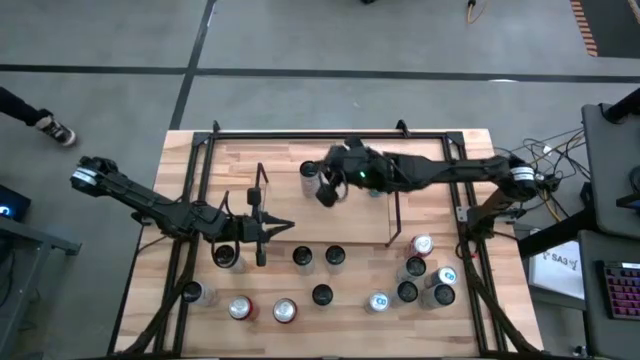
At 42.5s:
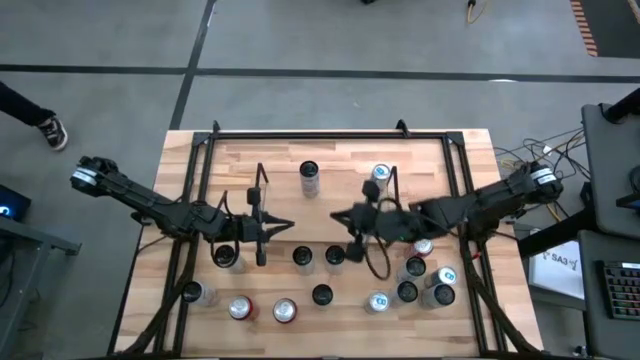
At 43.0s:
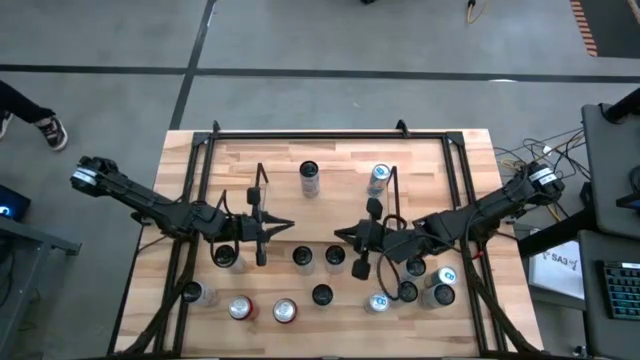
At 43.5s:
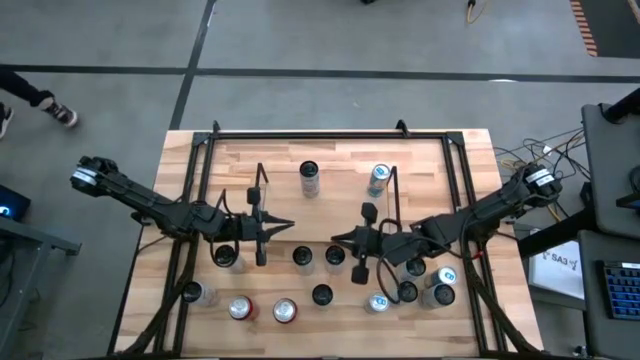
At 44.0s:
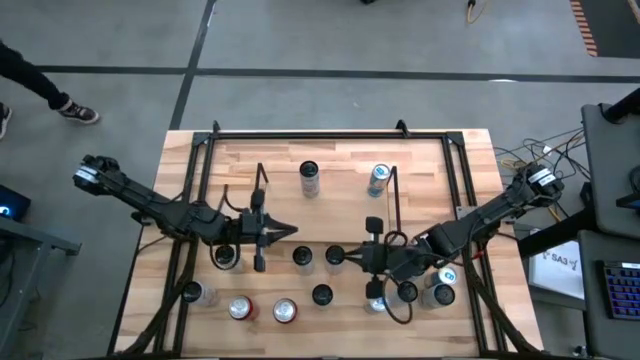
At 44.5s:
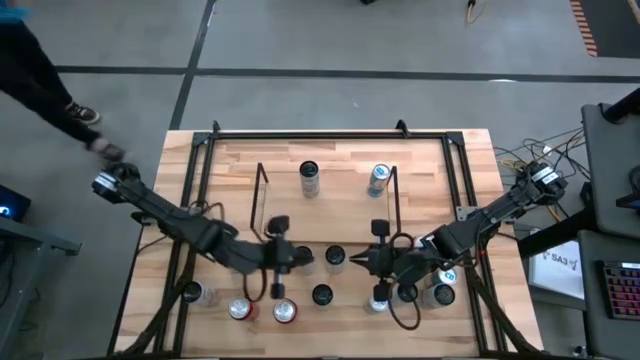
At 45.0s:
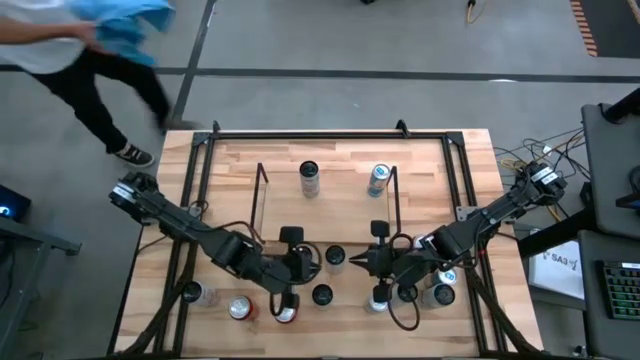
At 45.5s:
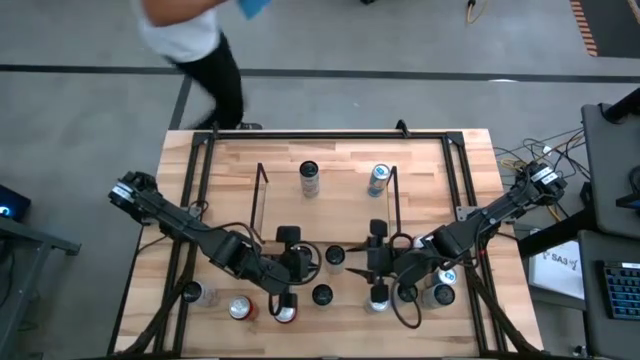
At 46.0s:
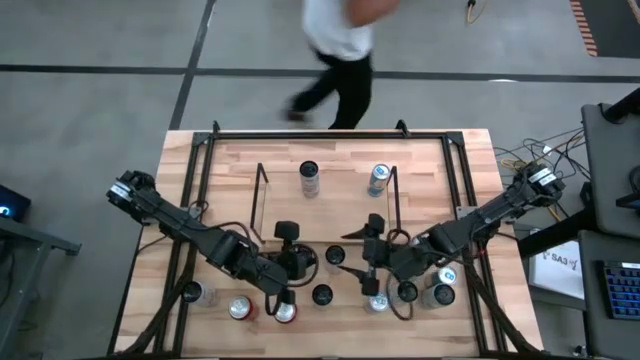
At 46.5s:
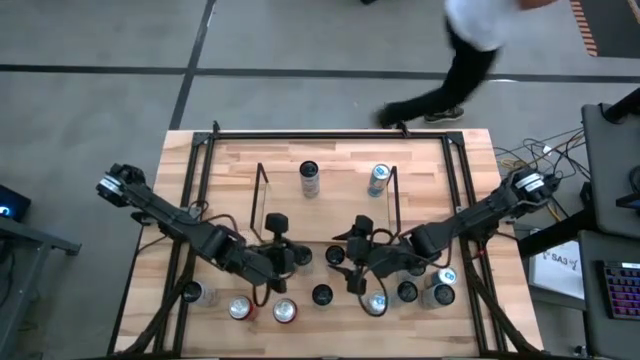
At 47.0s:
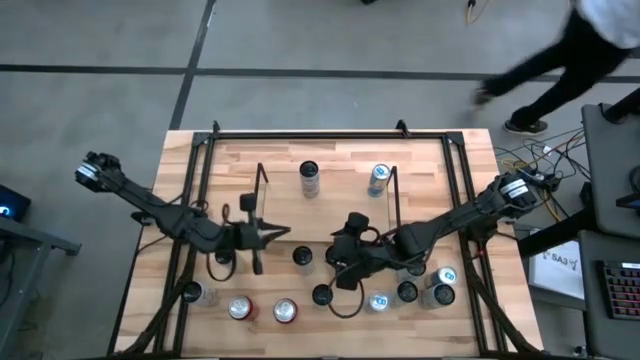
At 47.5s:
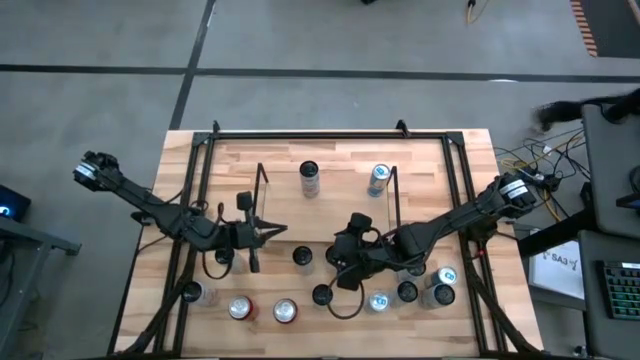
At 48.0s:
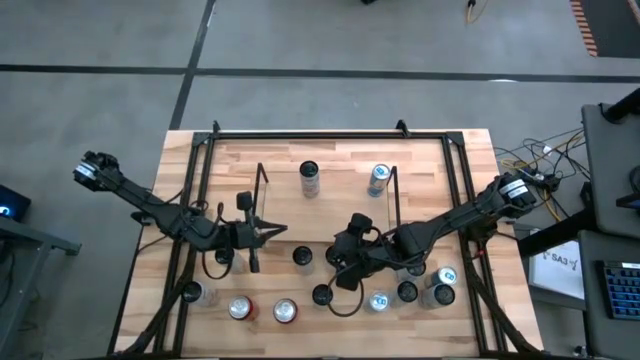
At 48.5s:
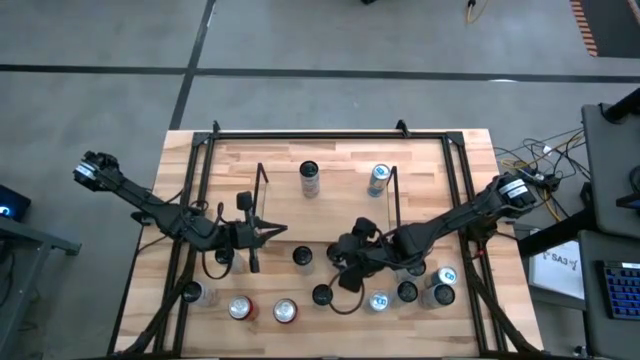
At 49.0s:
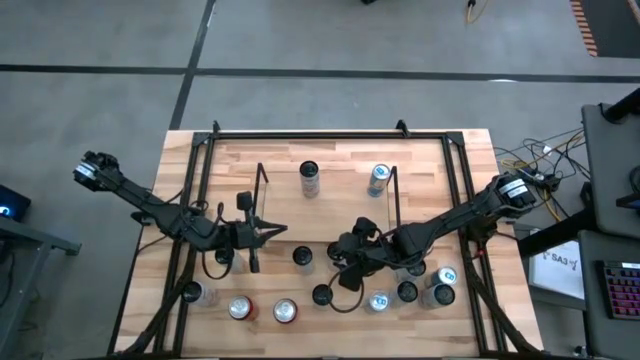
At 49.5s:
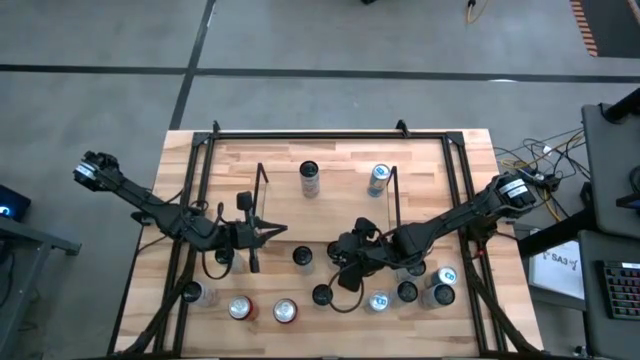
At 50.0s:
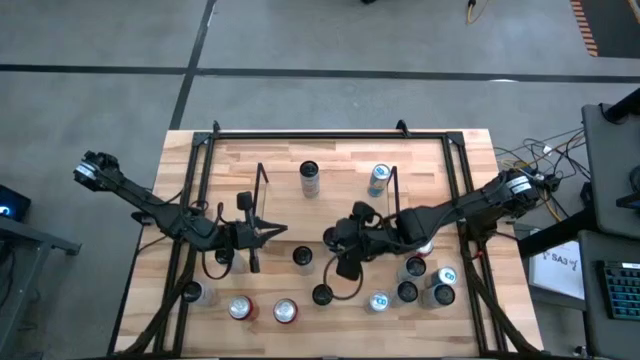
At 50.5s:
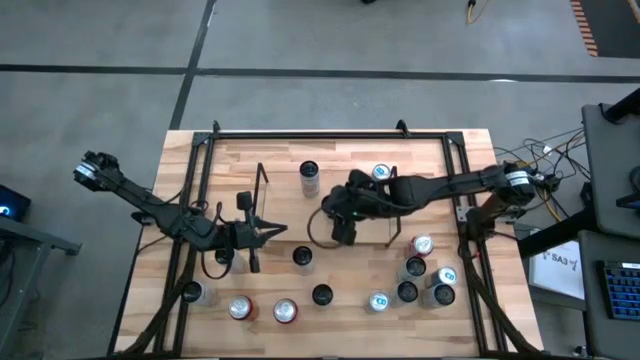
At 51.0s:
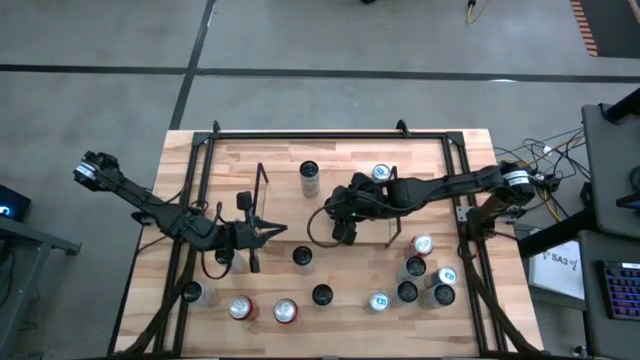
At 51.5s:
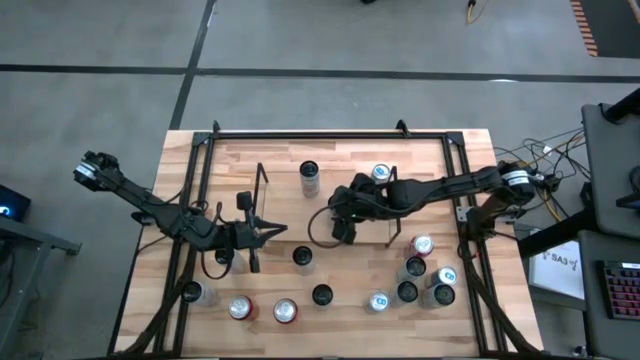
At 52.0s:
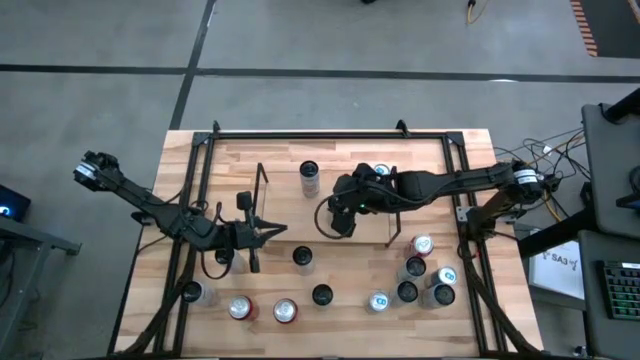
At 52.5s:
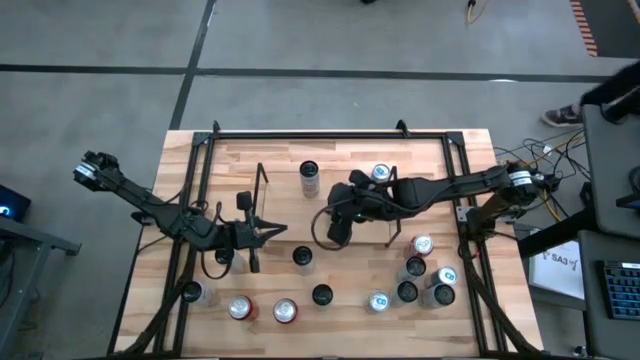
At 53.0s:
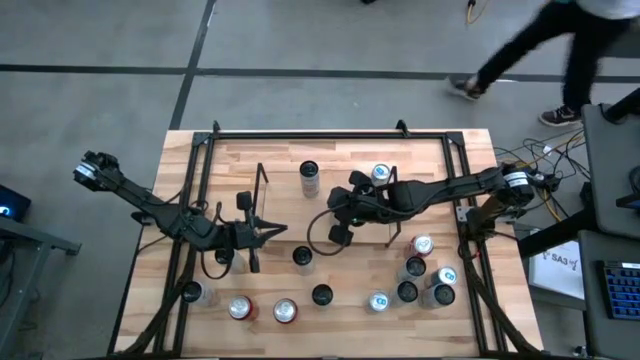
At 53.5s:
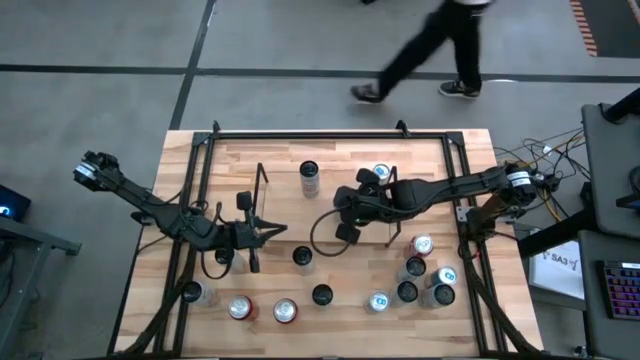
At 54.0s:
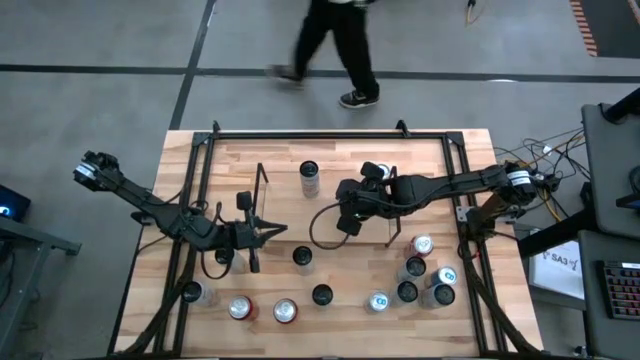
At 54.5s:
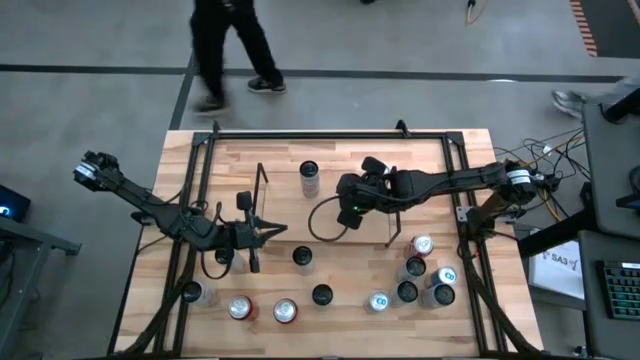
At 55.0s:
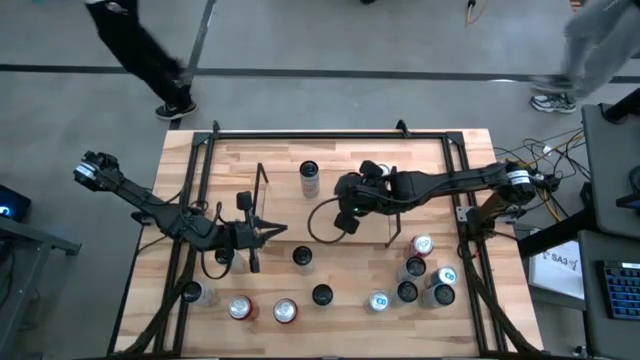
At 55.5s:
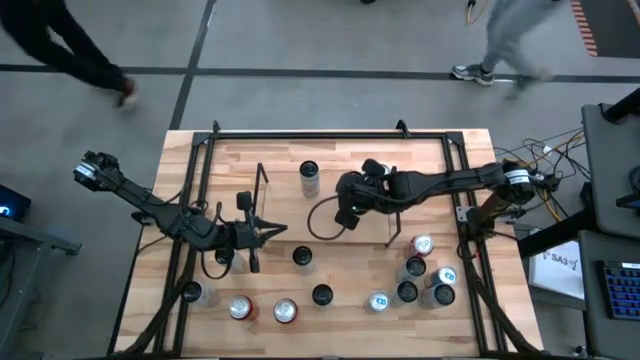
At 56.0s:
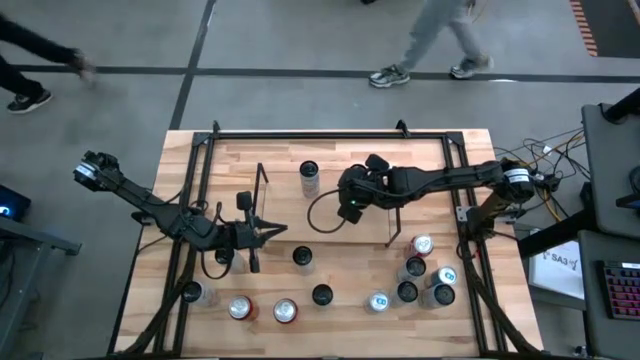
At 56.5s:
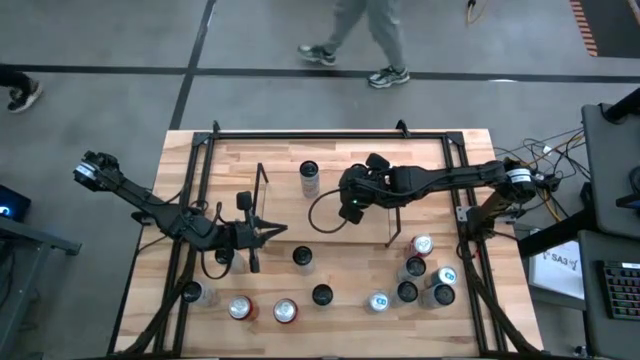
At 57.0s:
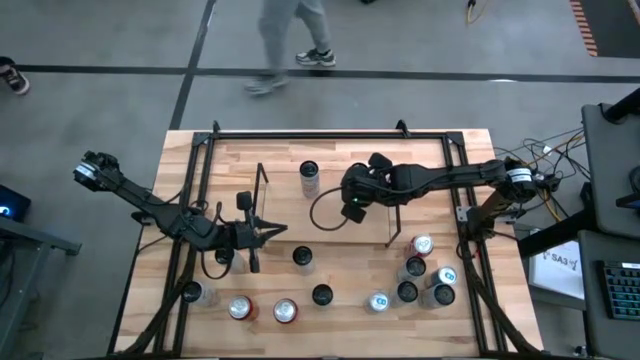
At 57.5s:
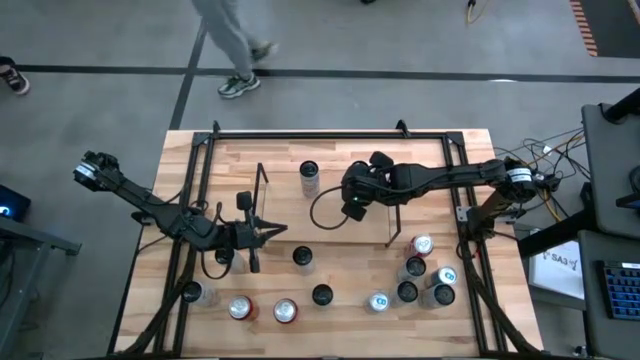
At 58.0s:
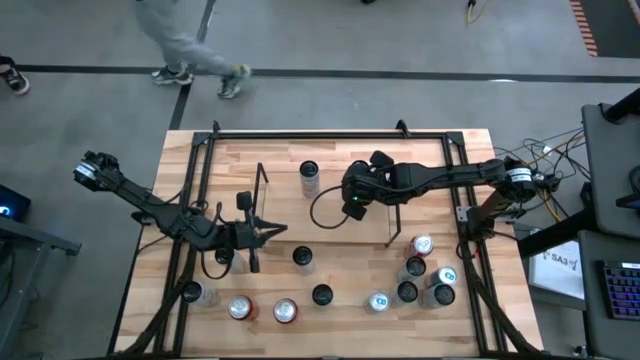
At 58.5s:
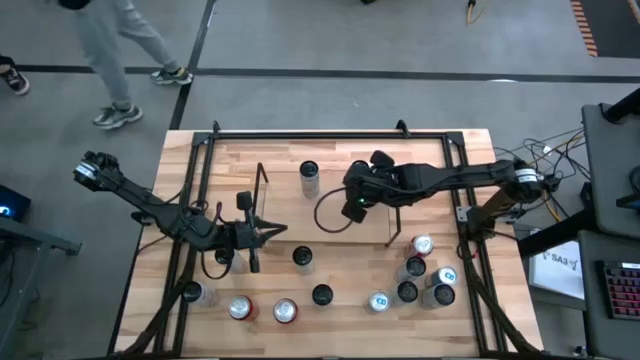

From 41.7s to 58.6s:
Task: Place canned beverage on shelf
Put the right white and yellow soda can on the shelf

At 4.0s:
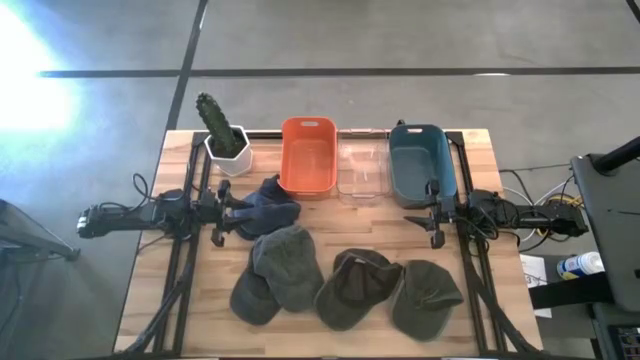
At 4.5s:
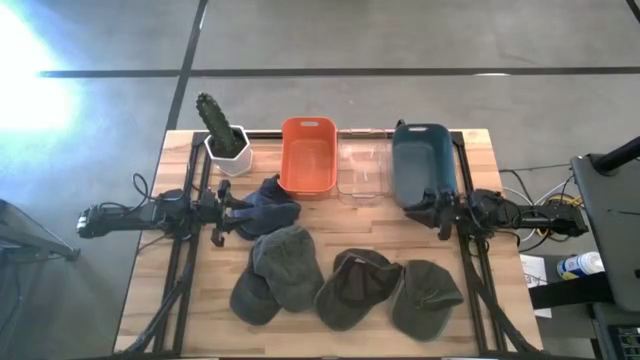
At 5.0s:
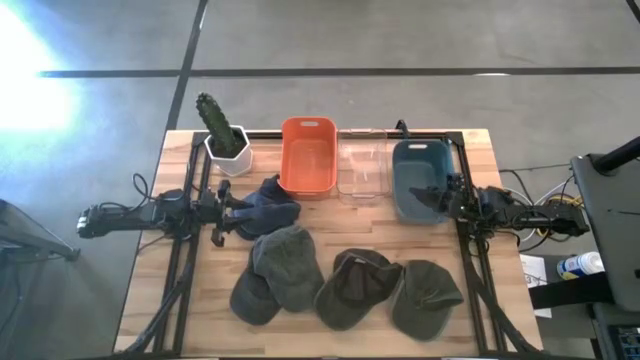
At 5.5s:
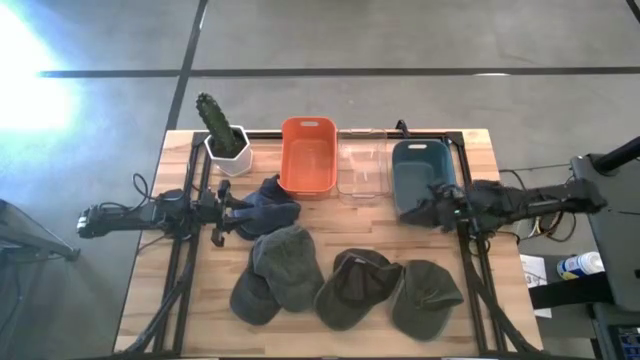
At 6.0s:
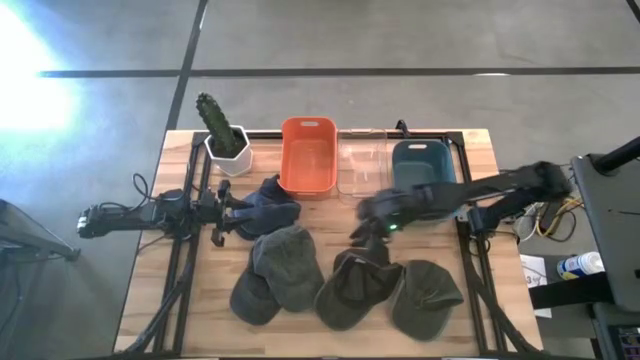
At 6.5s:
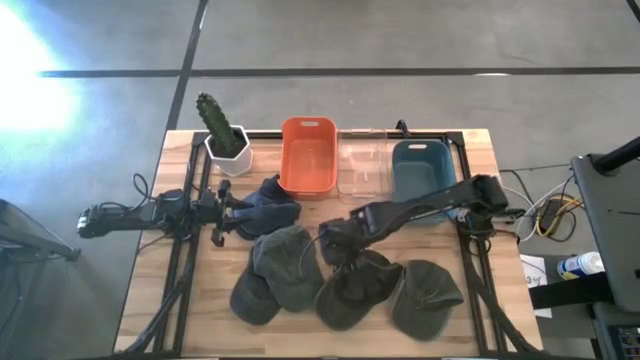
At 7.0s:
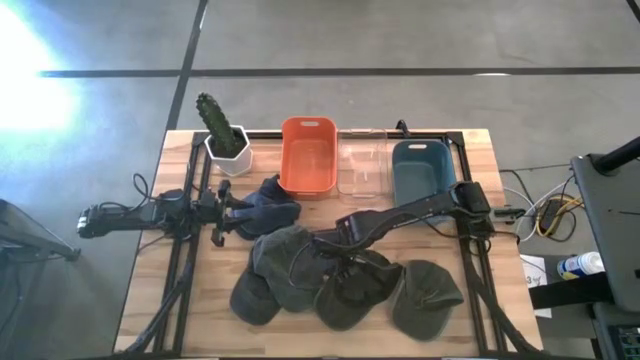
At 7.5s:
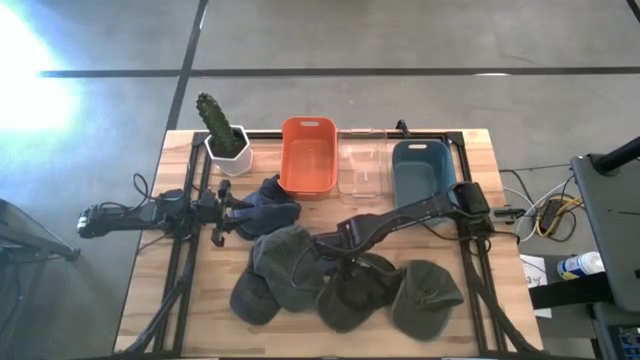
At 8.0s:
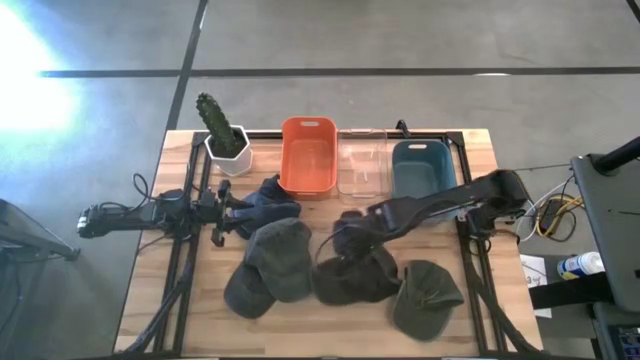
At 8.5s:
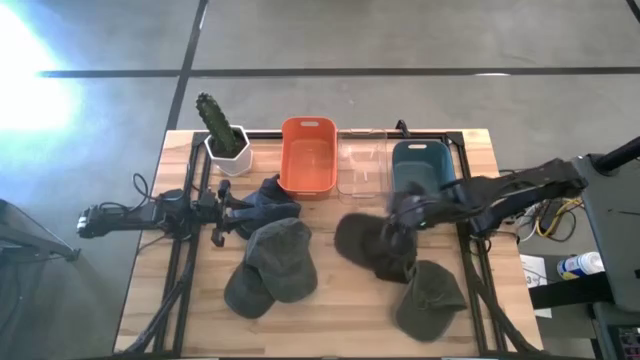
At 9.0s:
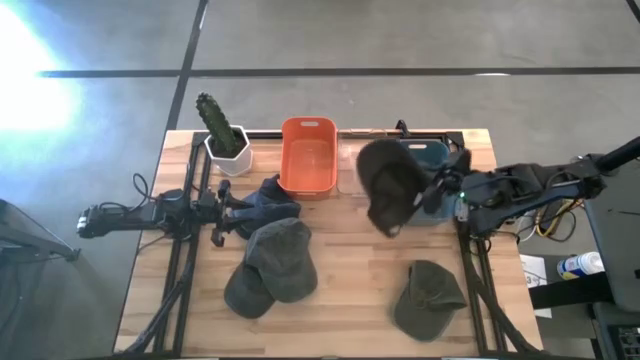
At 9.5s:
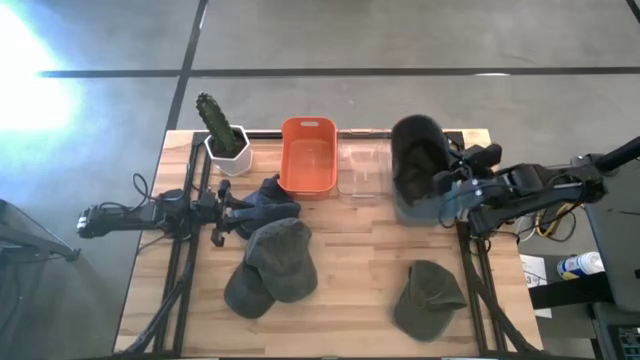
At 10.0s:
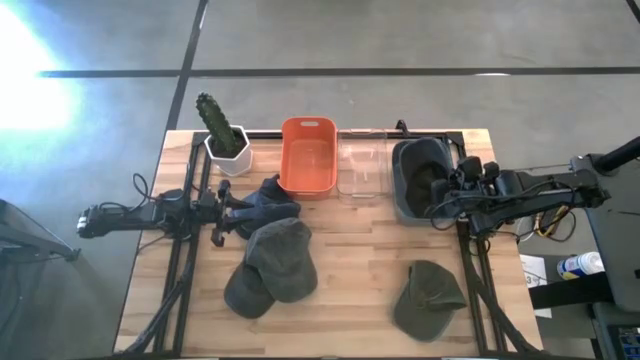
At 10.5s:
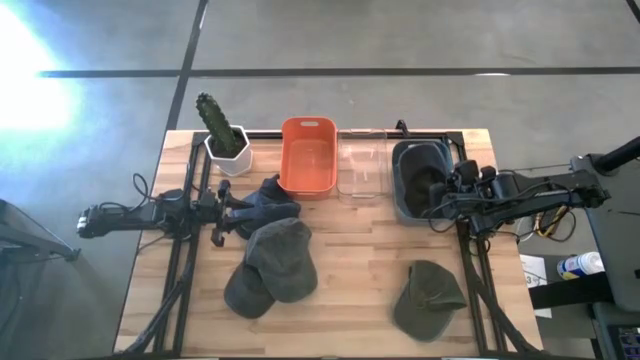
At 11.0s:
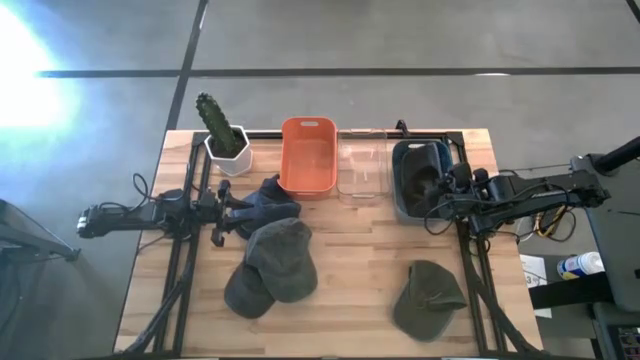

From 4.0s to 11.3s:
Task: Pick & Place hat
Put the black cap into the blue bin
